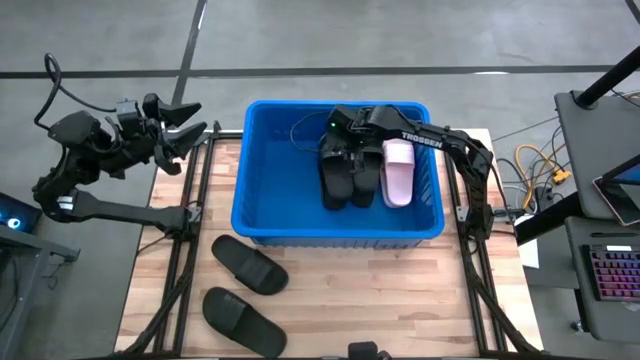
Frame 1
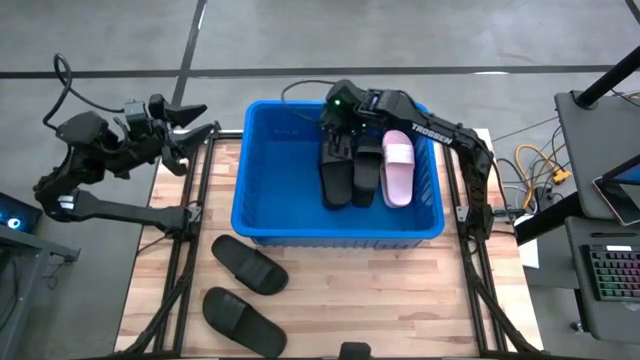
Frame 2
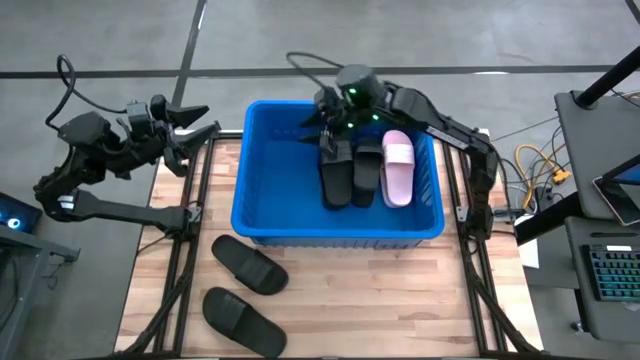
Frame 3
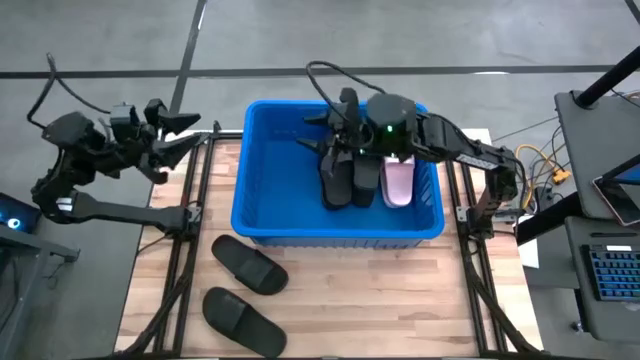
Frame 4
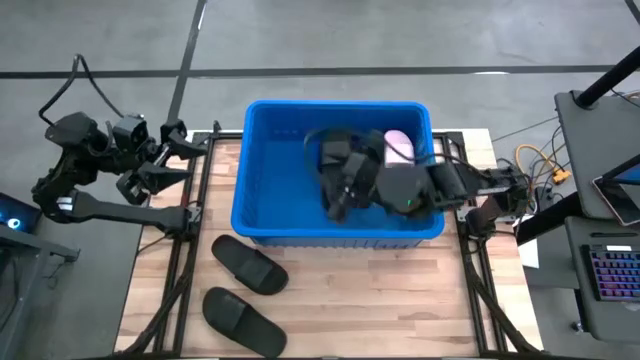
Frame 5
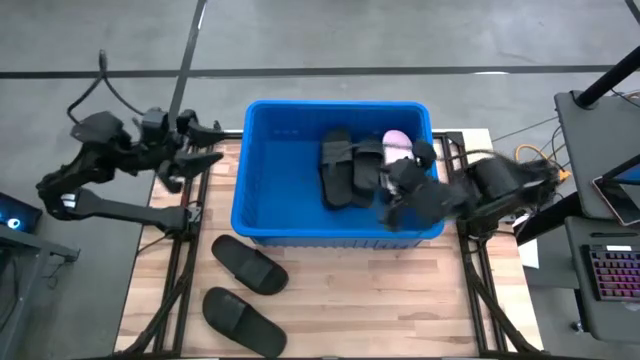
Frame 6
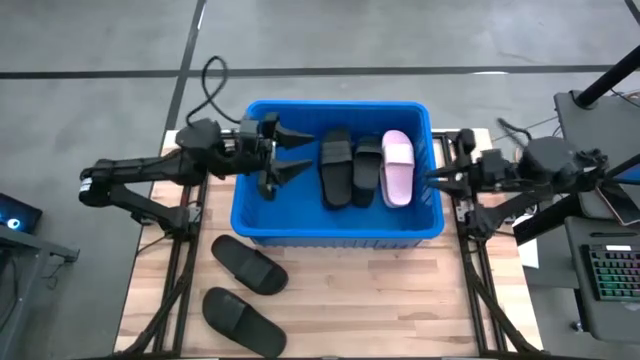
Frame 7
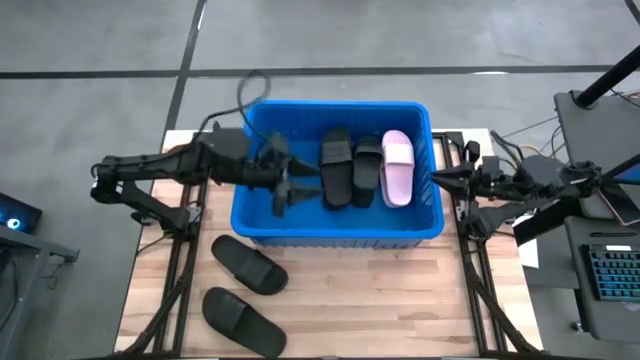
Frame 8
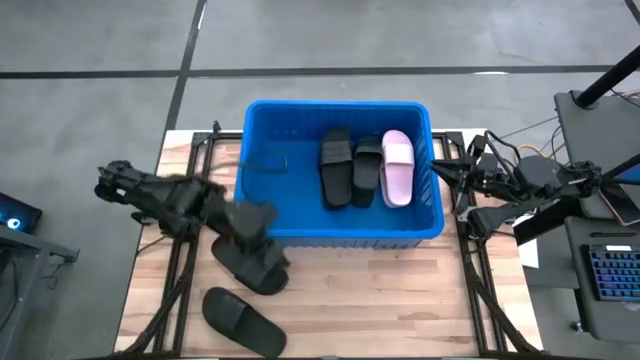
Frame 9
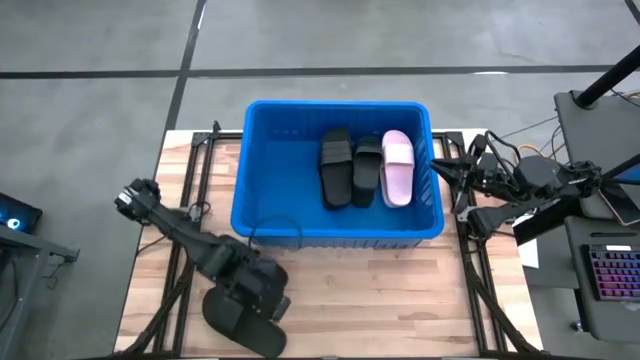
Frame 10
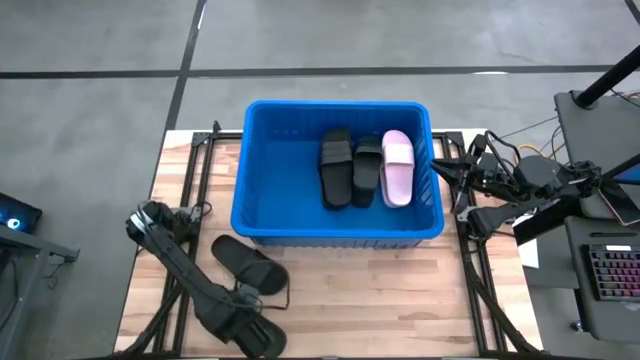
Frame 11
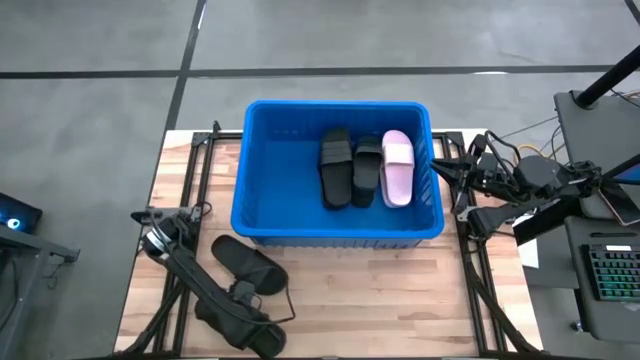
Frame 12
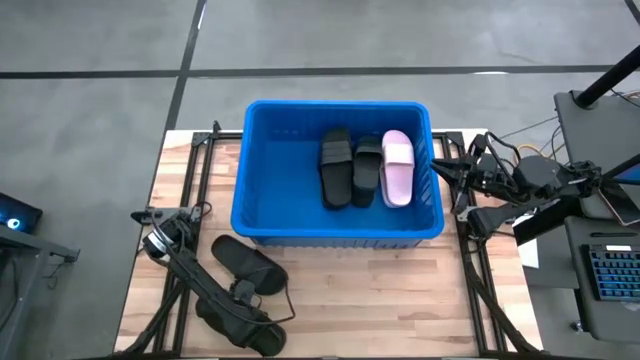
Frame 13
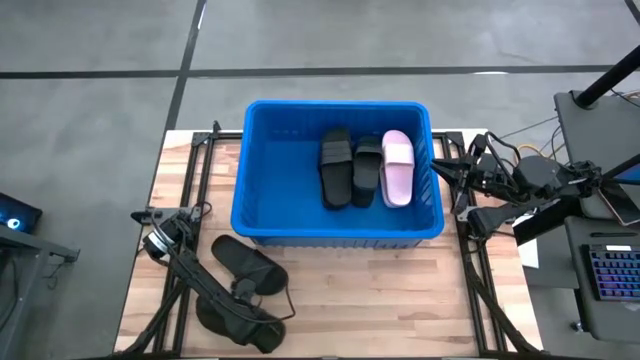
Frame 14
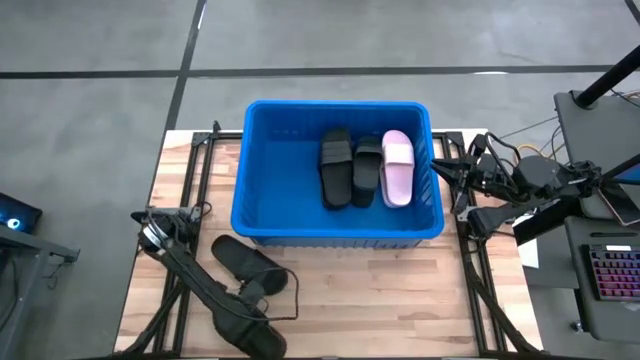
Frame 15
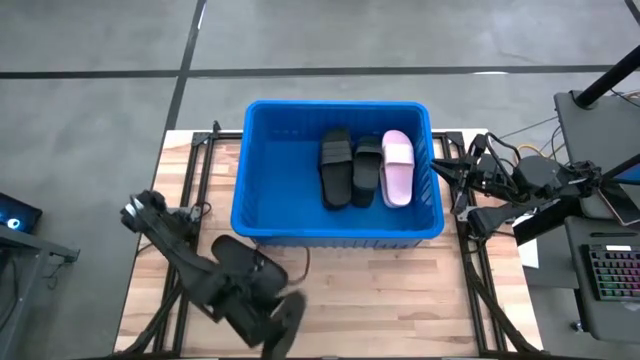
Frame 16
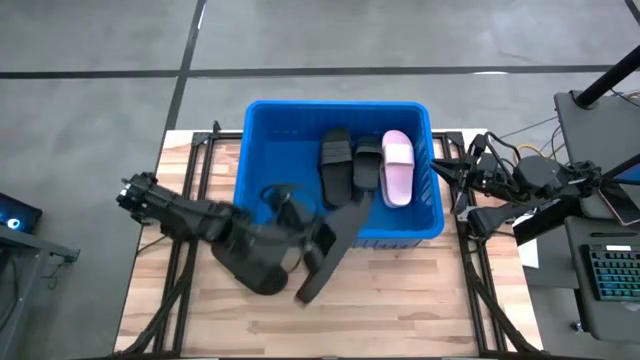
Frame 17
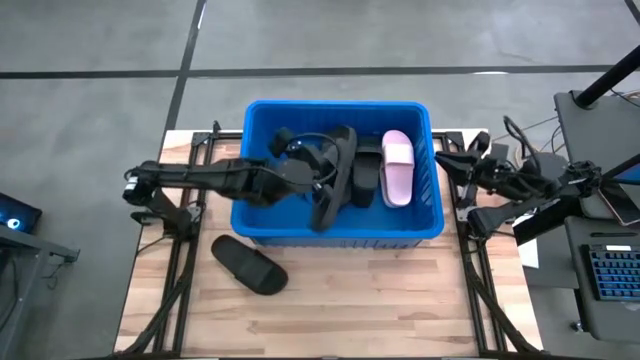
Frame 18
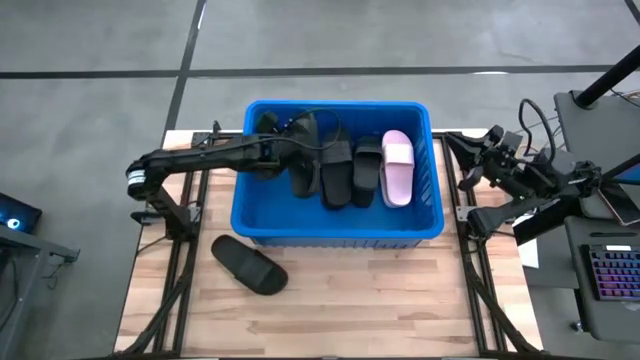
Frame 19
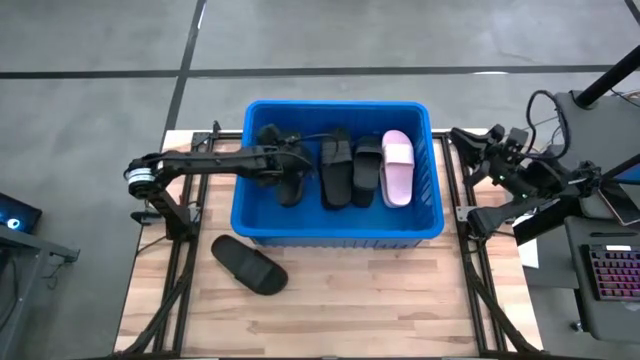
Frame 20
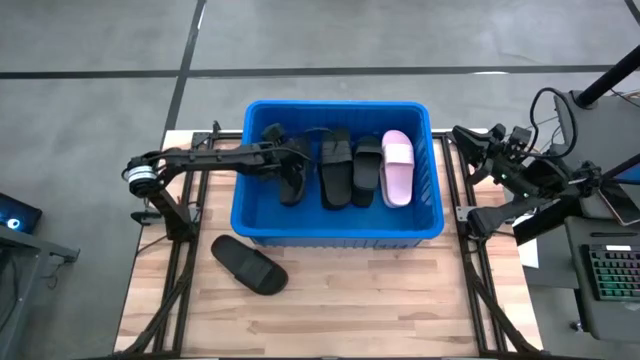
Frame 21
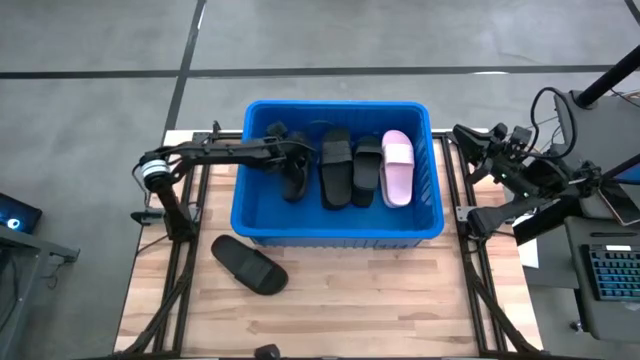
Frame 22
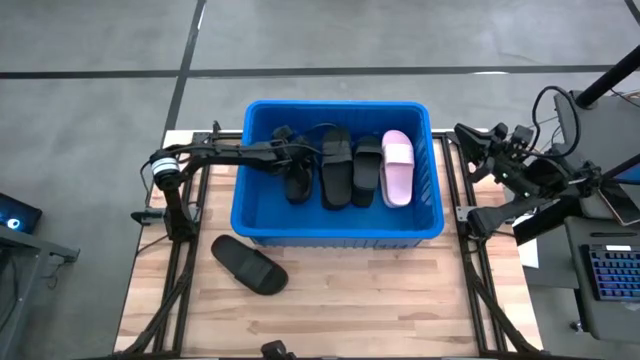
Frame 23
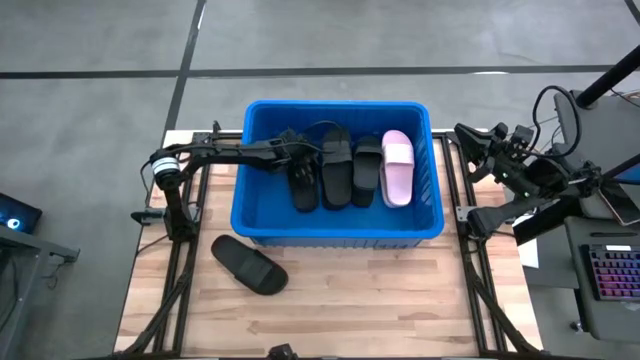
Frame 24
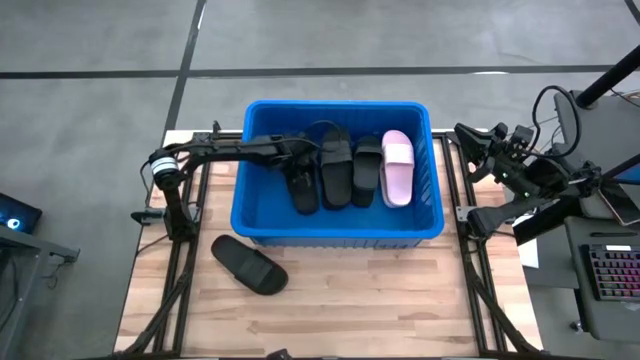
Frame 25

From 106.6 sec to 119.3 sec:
Task: Pick and place slides into bin
Put the black slide into the blue bin

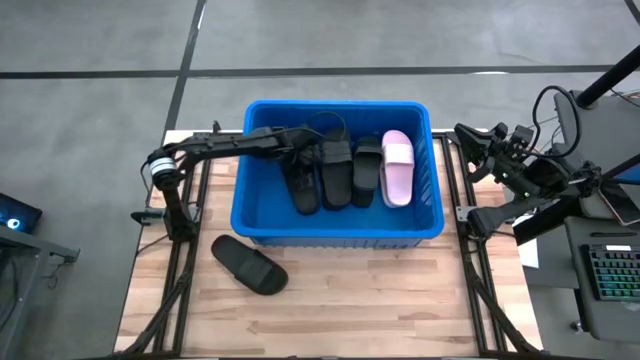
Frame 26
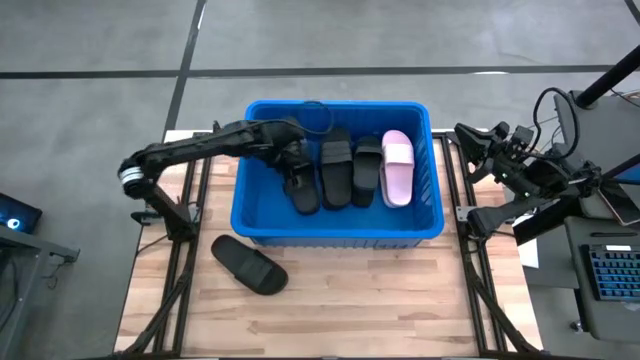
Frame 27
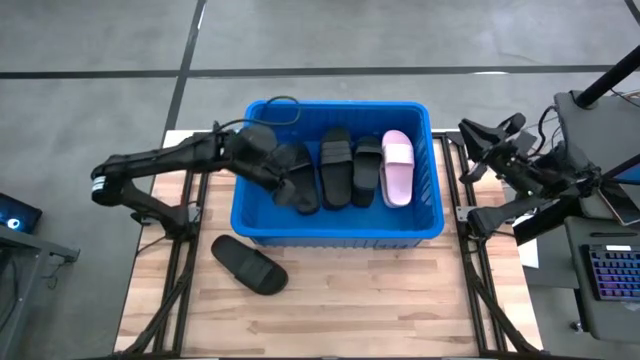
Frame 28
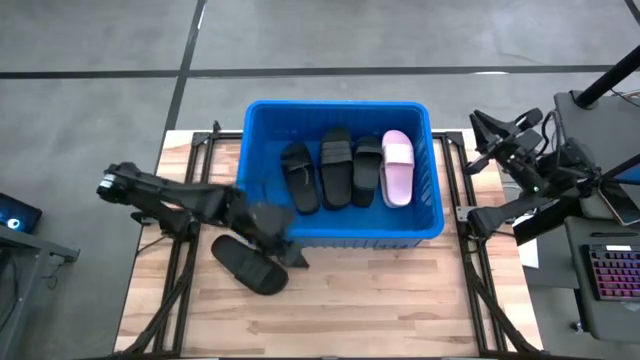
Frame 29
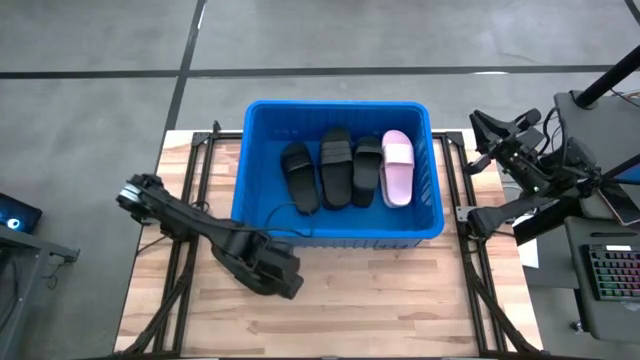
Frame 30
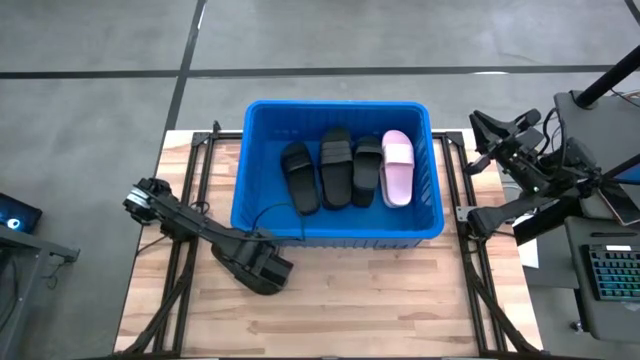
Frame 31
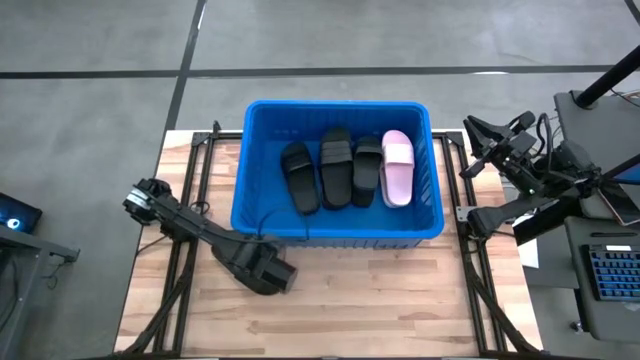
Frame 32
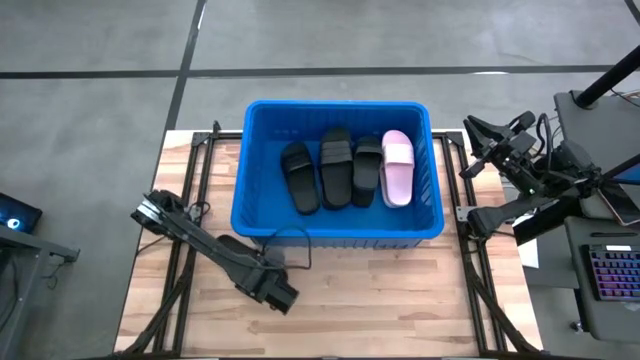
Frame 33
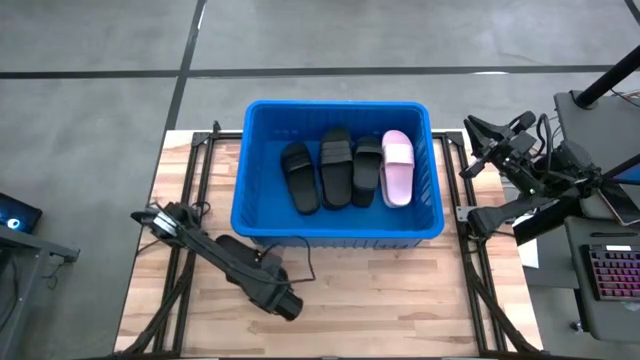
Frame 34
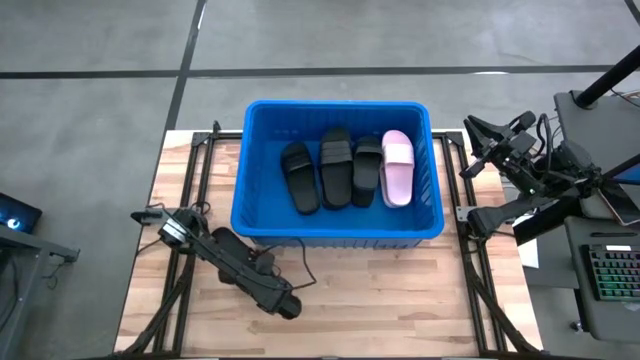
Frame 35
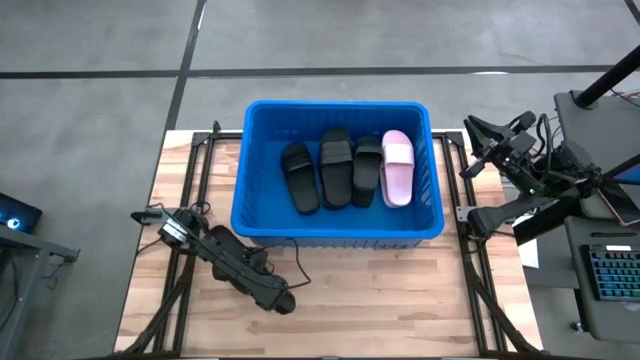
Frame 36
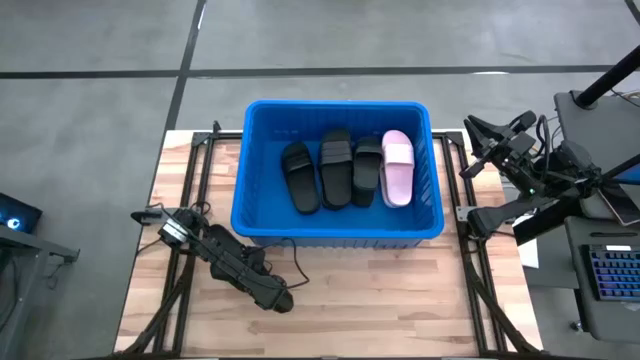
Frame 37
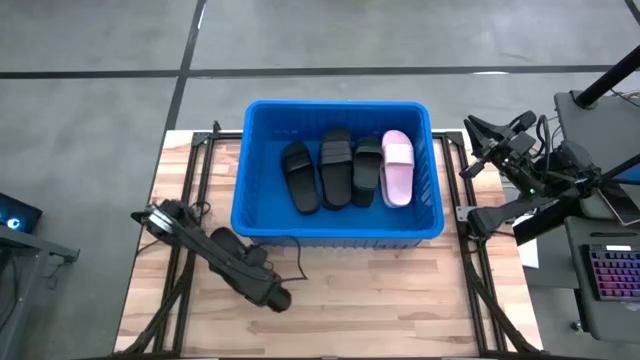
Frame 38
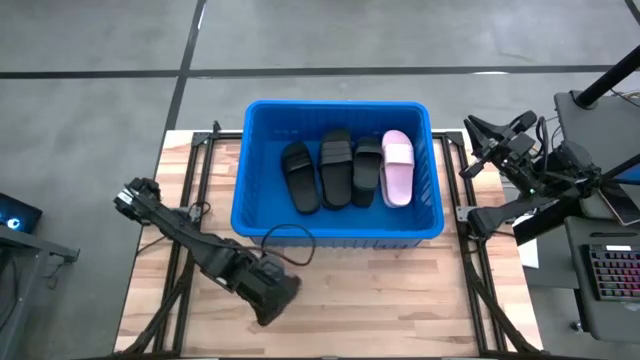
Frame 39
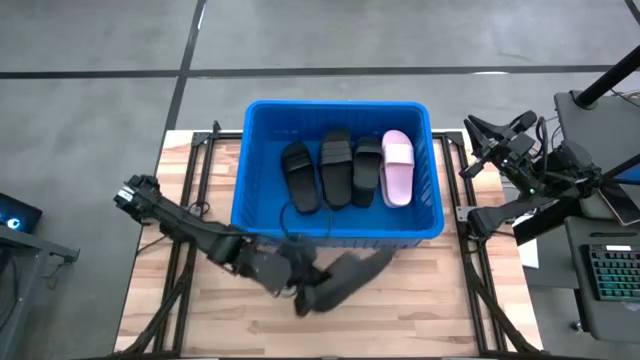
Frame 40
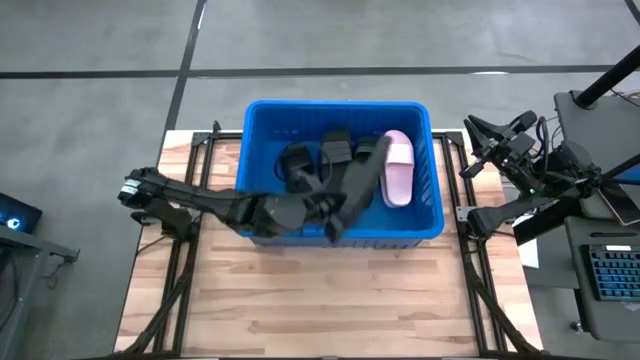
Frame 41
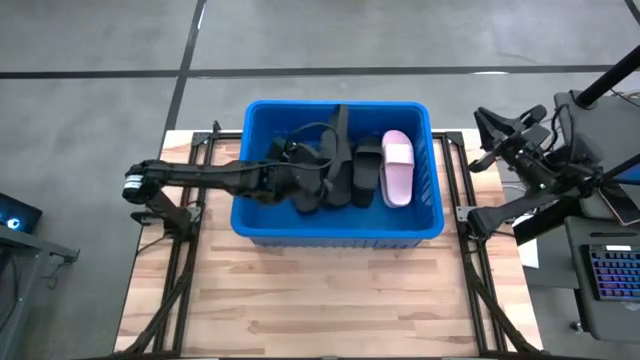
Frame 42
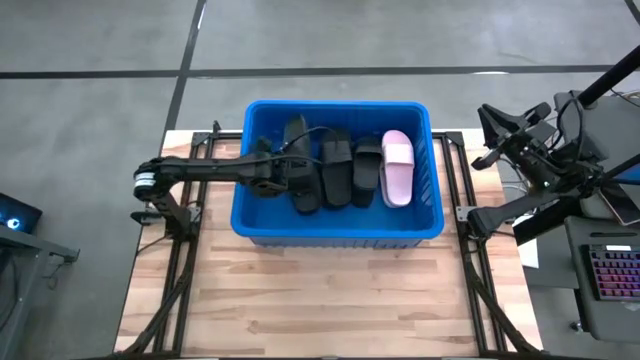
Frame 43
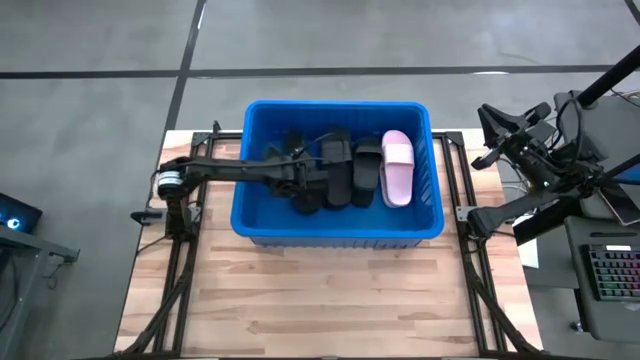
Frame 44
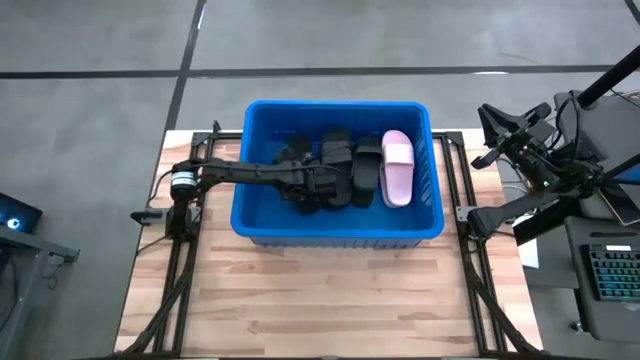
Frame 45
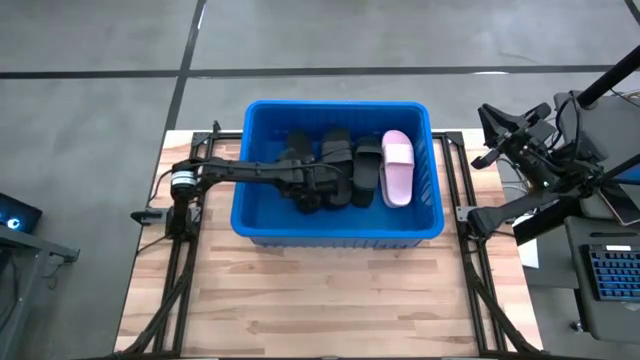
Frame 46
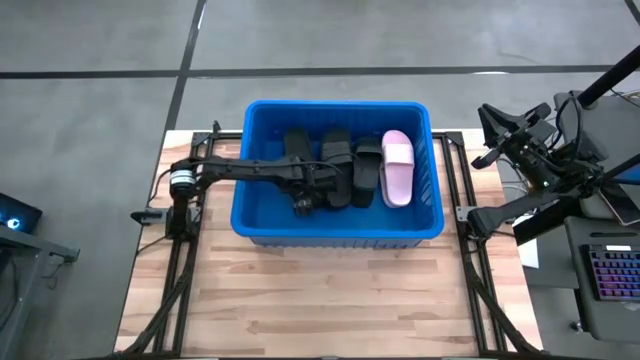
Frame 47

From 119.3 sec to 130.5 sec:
Put the black slide into the blue bin
